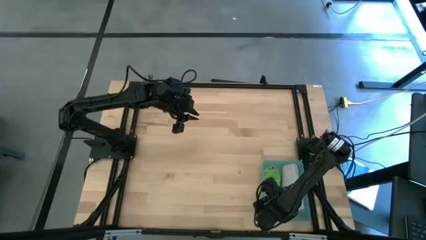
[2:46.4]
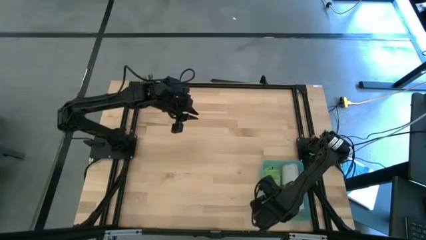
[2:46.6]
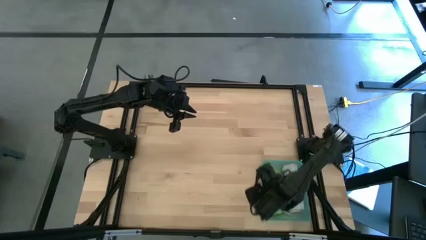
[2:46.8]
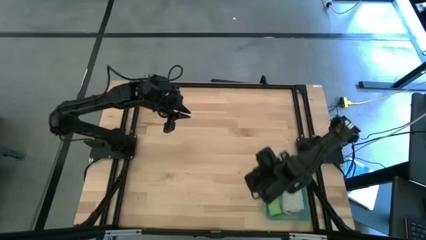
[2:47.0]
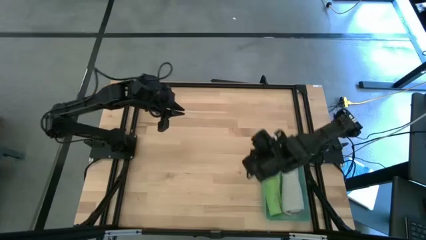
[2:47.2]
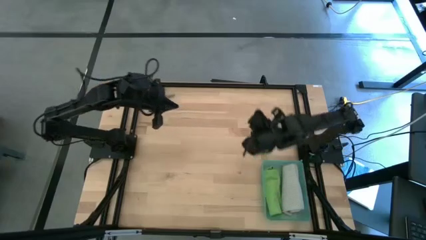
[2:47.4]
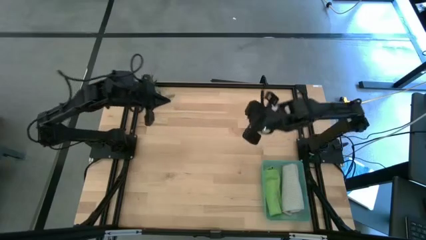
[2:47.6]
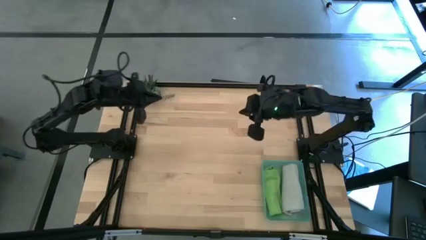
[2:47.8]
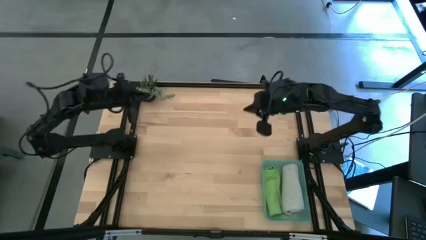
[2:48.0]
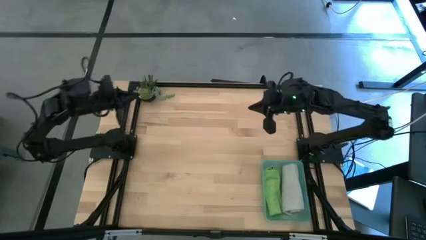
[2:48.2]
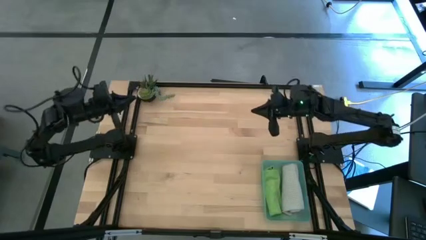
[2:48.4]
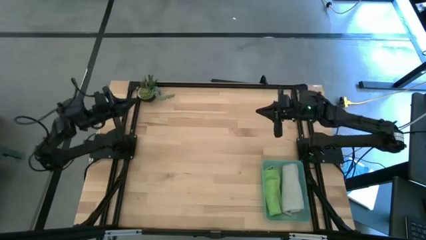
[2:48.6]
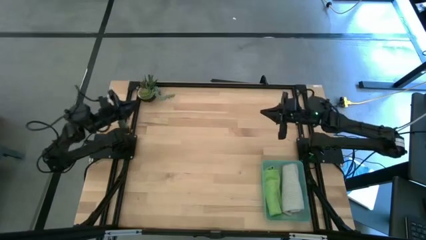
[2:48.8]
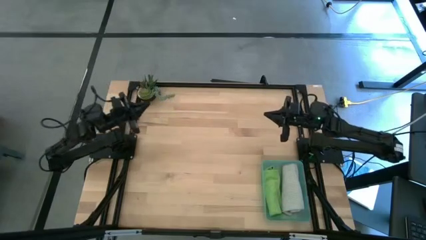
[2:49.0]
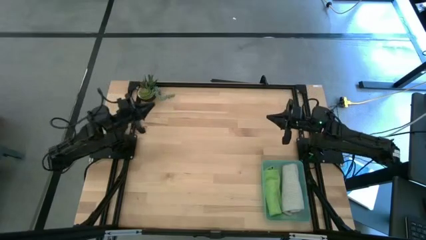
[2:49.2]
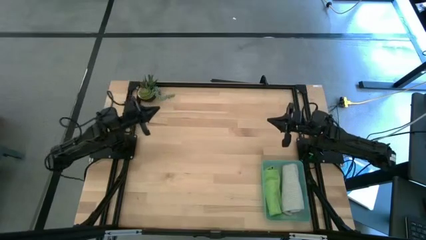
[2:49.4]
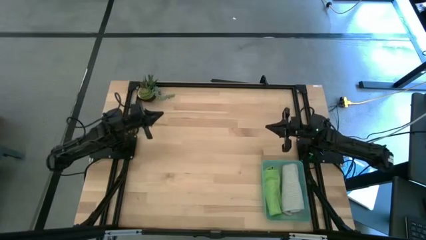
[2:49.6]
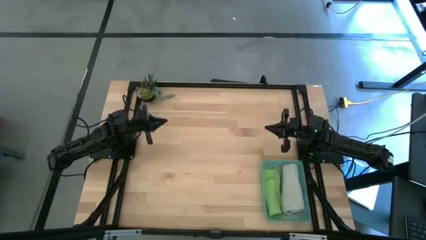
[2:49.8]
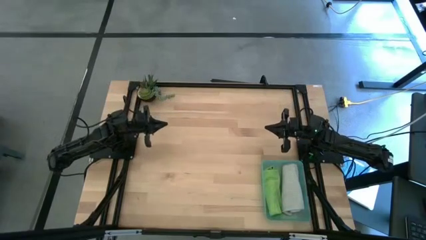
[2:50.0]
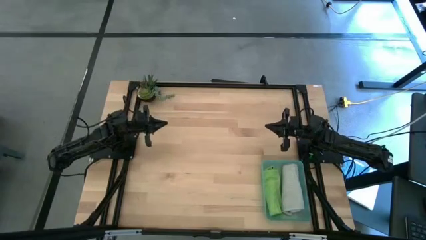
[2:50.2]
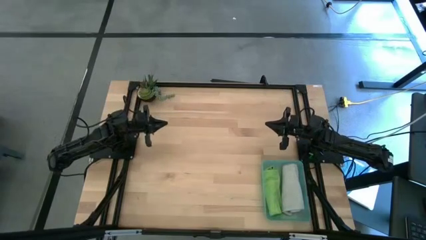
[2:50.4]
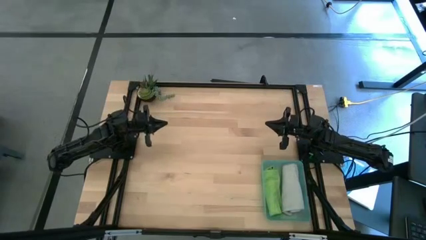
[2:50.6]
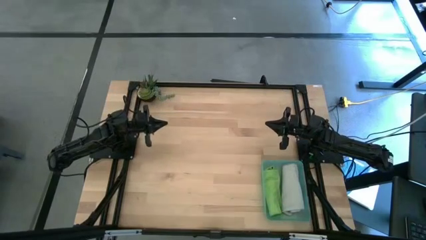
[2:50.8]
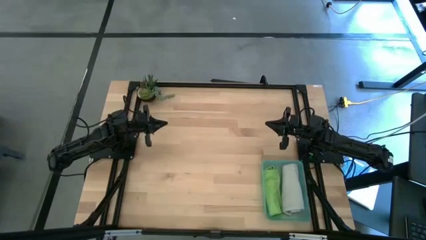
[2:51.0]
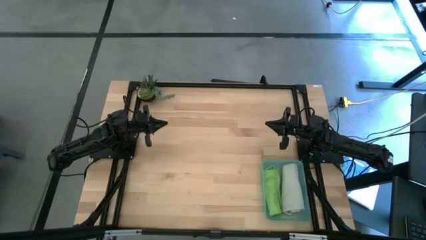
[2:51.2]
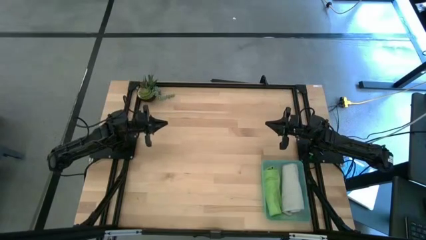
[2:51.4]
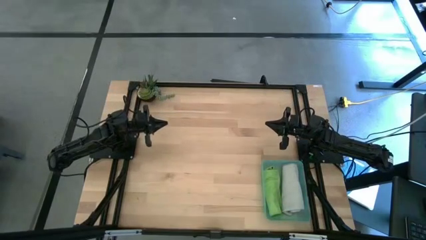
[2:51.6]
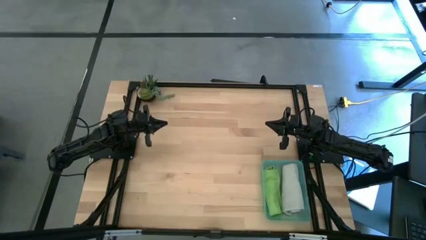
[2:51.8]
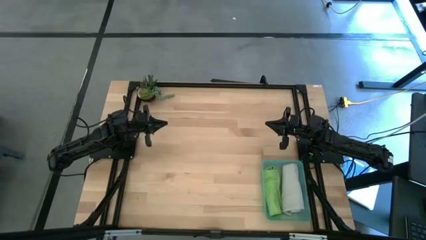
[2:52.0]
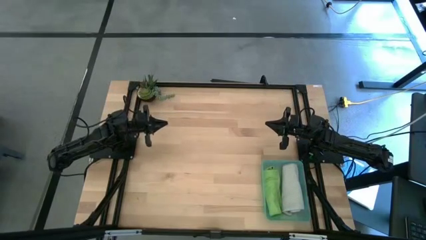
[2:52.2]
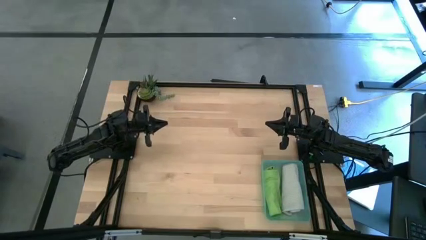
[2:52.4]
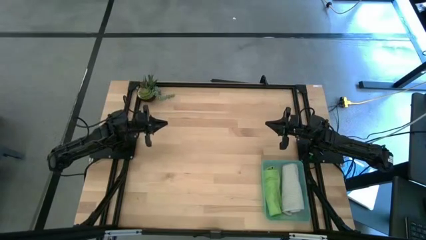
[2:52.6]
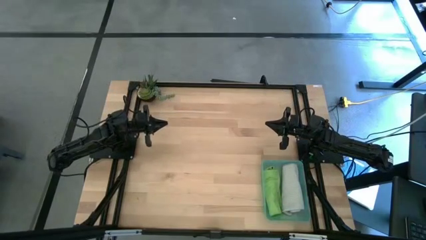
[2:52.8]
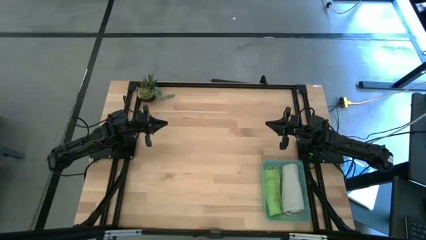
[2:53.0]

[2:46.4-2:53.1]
Task: Roll microfiber towels into tight, uniform cylinder then place into a basket
Return to Home Position

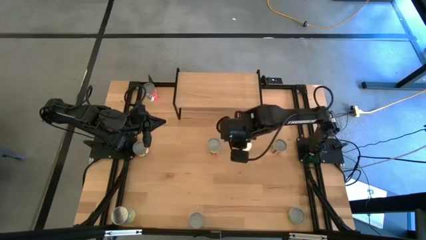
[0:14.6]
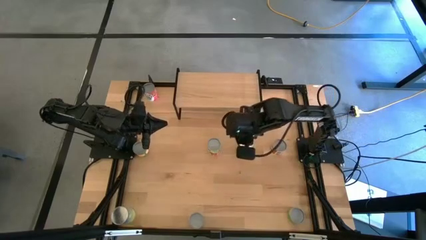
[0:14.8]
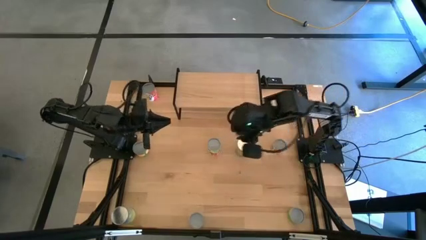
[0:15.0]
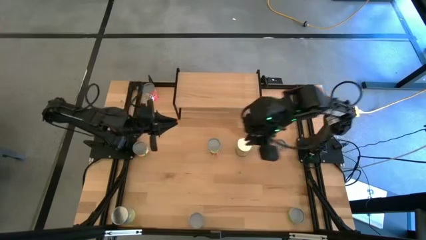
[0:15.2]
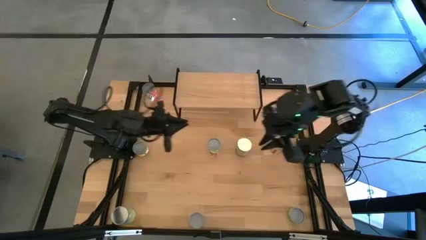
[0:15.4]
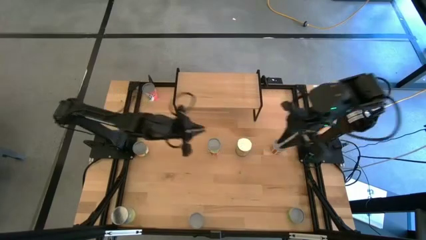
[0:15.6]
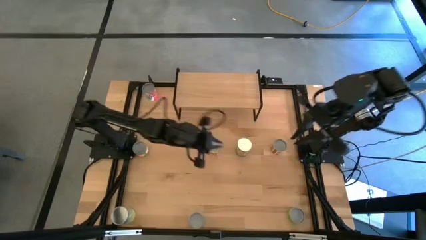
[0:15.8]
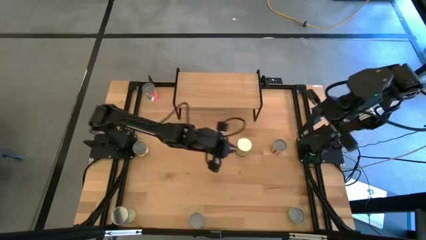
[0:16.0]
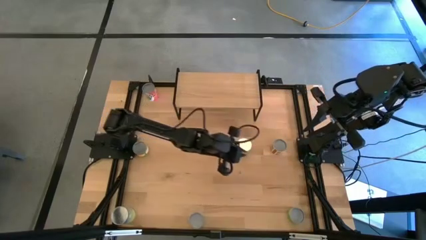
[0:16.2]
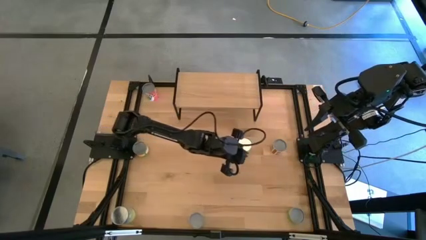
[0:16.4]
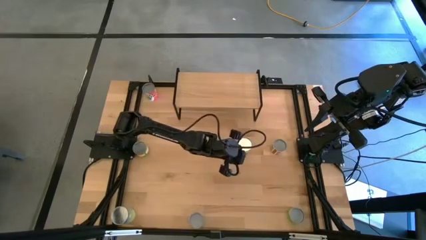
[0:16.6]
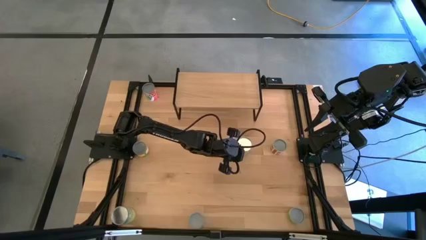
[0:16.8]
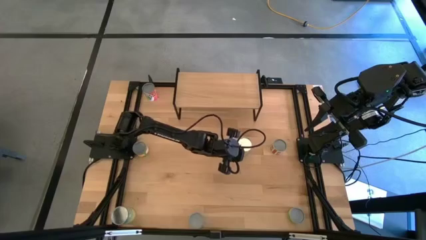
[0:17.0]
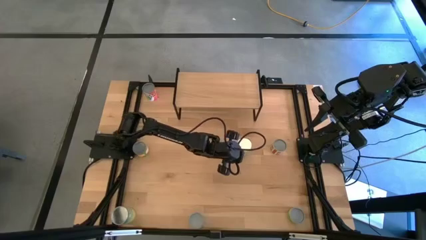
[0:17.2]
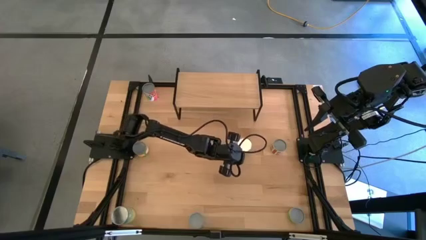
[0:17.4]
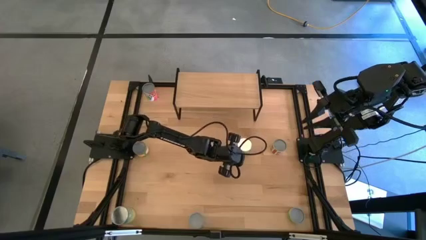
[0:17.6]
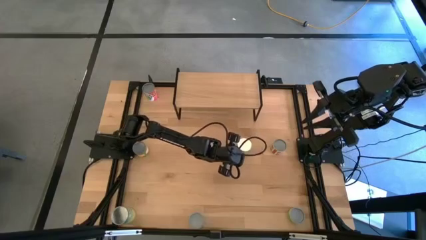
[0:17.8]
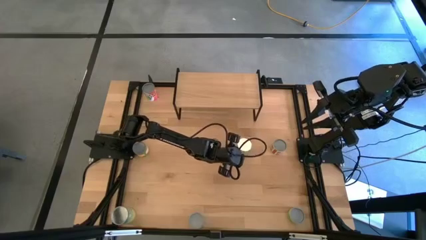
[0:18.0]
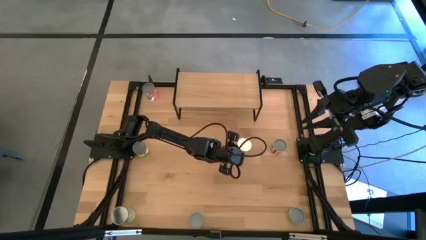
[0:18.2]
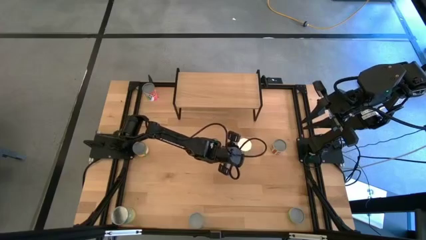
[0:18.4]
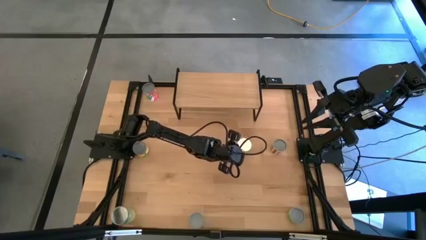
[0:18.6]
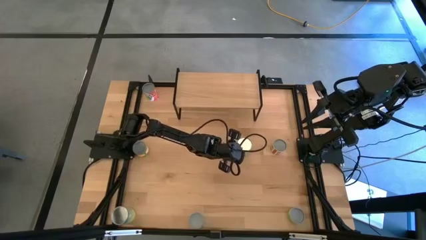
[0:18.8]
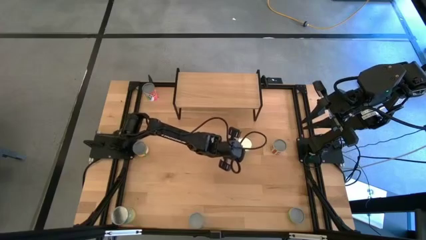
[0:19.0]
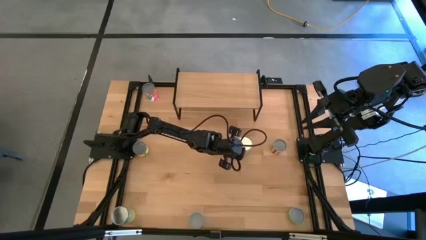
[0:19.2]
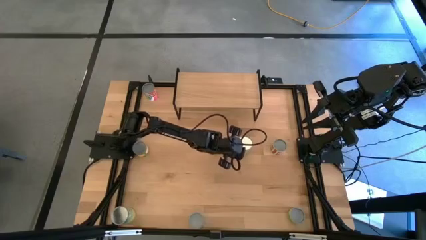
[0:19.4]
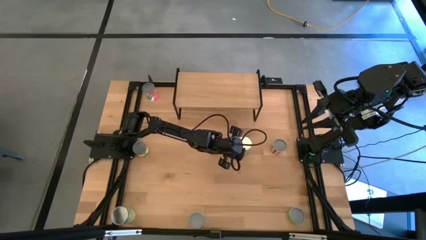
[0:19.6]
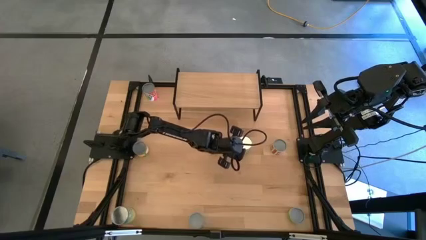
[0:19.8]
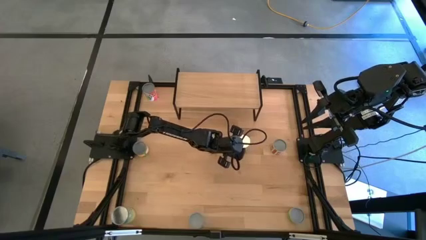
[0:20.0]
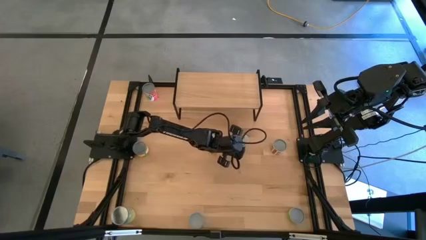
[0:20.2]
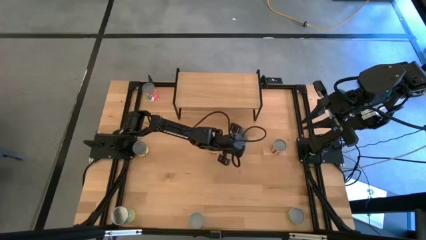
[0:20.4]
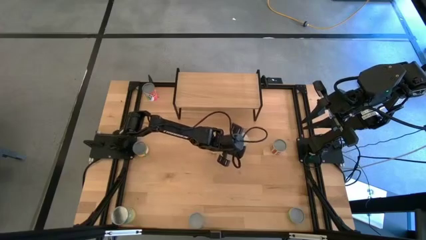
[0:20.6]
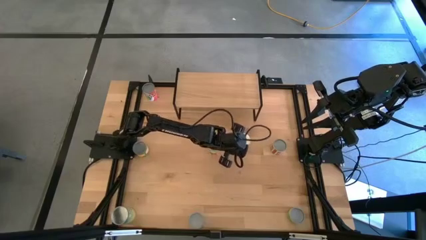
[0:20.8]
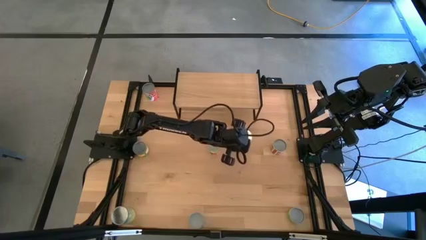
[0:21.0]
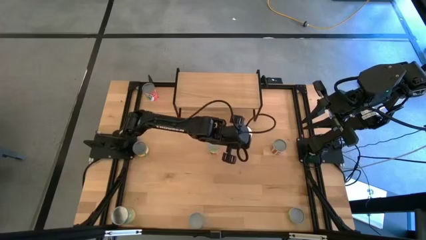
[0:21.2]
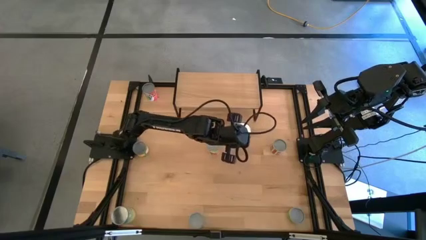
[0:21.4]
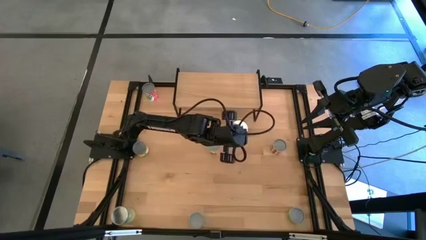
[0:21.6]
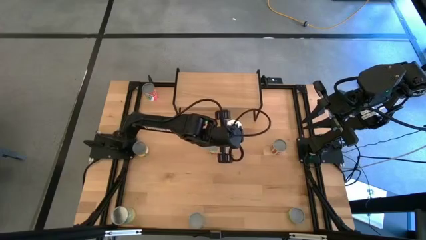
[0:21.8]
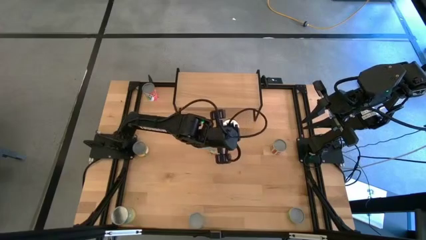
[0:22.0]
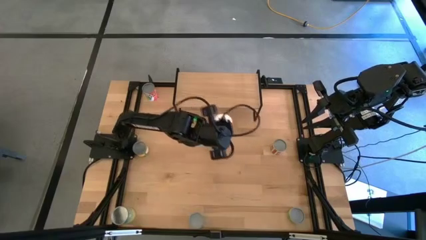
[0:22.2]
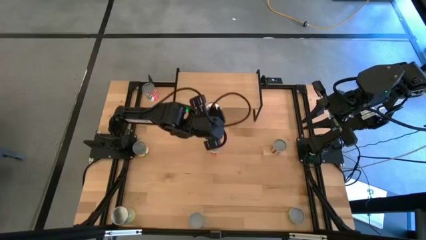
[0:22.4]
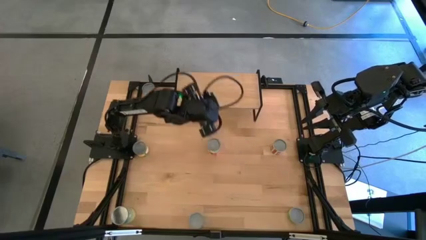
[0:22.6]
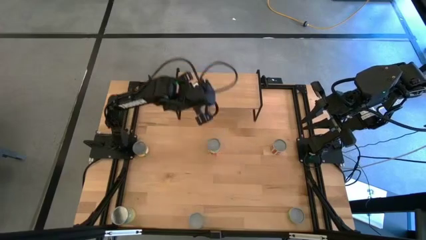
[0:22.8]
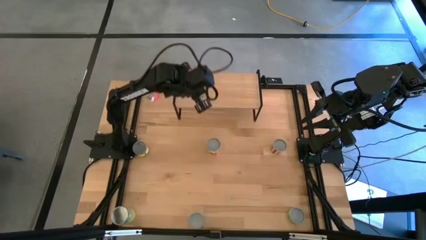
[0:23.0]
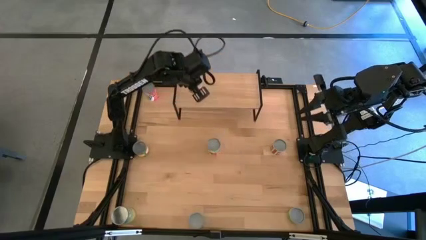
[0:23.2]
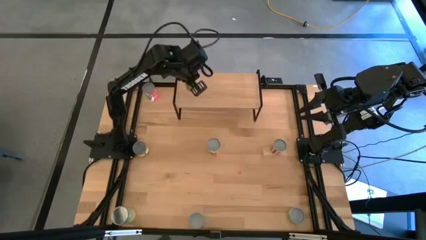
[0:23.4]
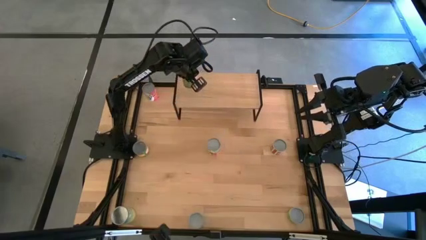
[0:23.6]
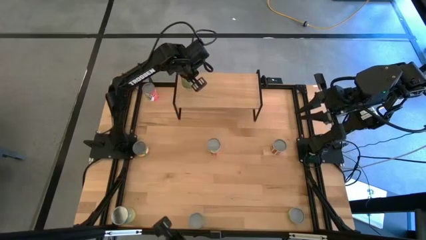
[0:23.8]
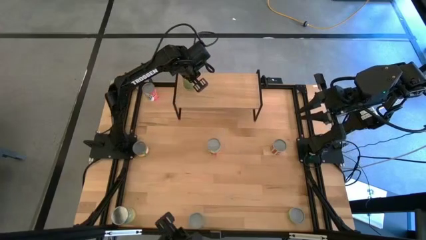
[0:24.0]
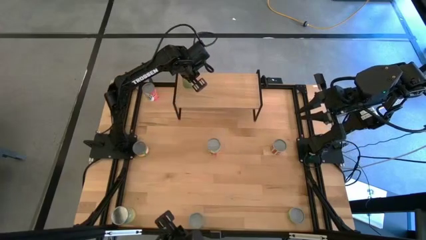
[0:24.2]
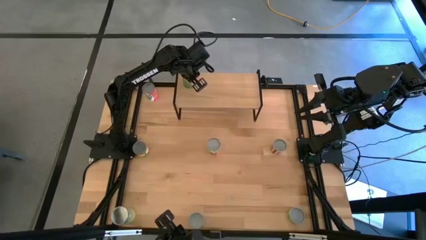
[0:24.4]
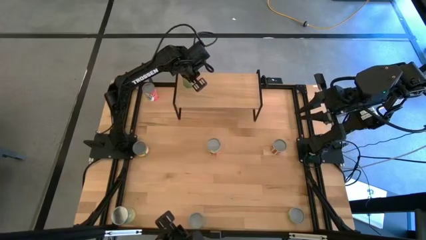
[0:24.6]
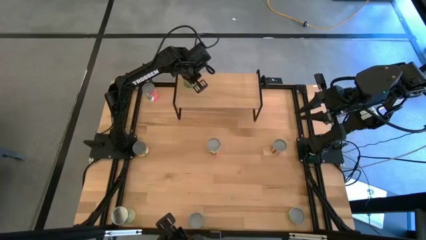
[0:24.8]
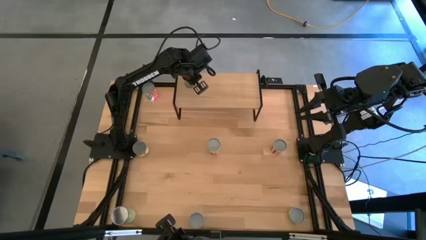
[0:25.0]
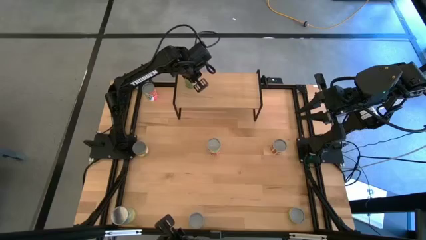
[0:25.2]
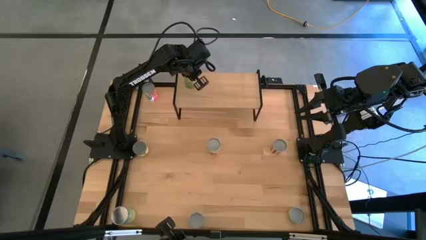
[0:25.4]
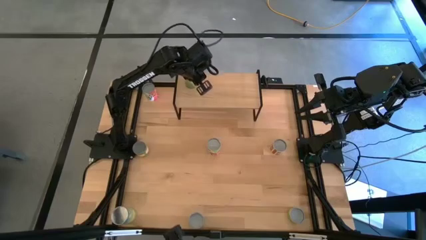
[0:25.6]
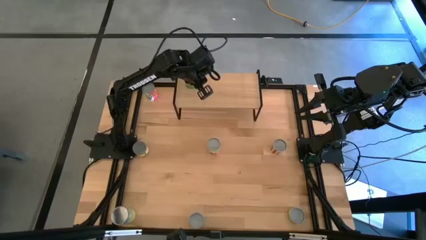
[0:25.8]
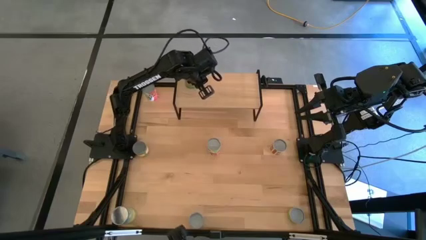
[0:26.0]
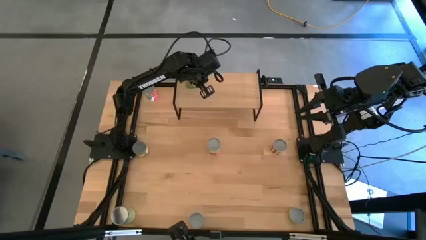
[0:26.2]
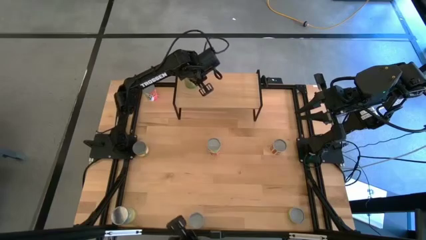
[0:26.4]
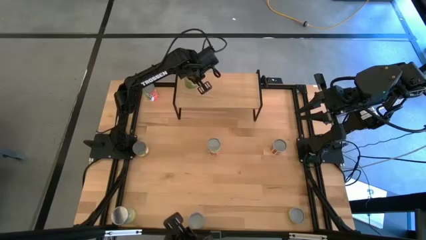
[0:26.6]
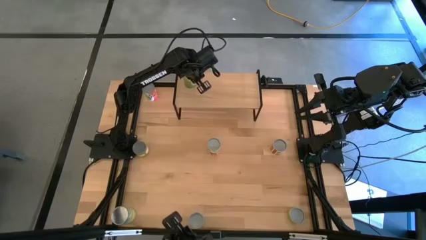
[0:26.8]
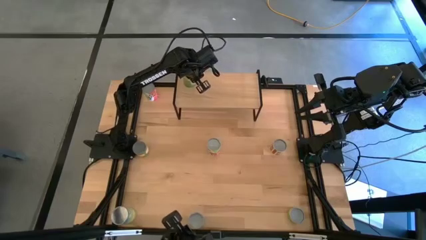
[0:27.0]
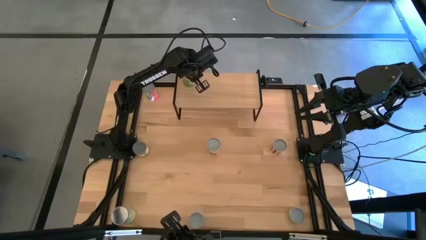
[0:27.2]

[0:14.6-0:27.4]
Task: Pick and place cans onto a shelf
Put the canned oranges on the shelf
